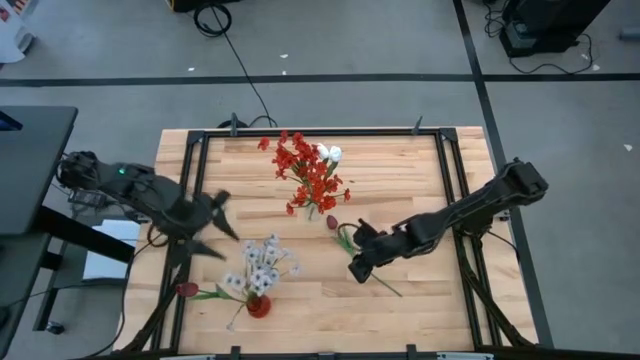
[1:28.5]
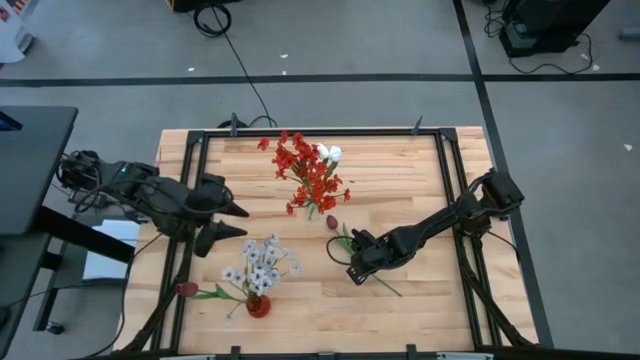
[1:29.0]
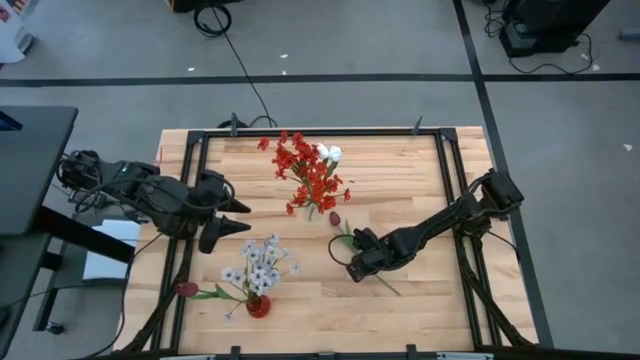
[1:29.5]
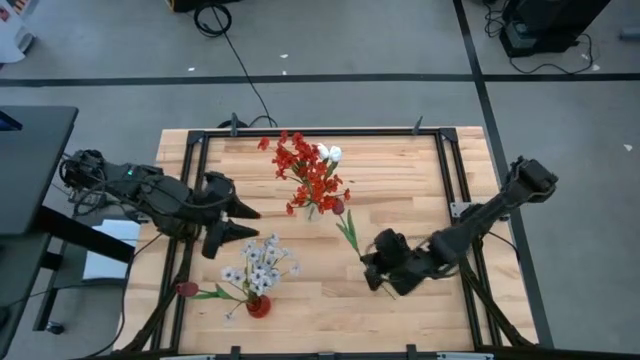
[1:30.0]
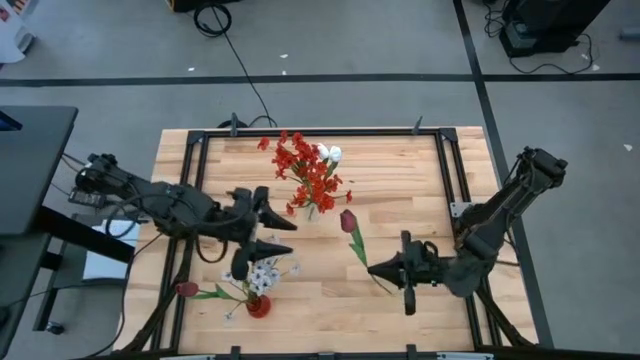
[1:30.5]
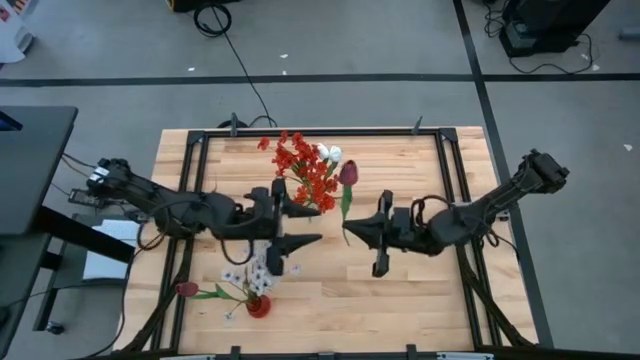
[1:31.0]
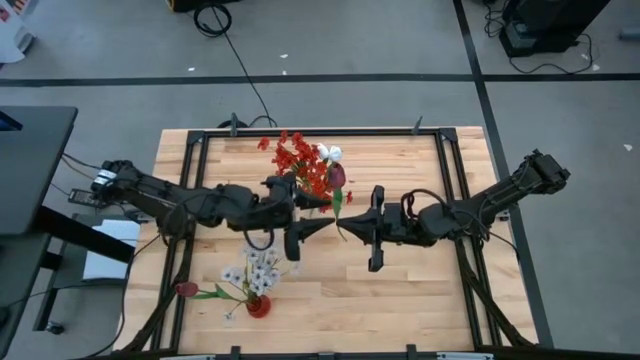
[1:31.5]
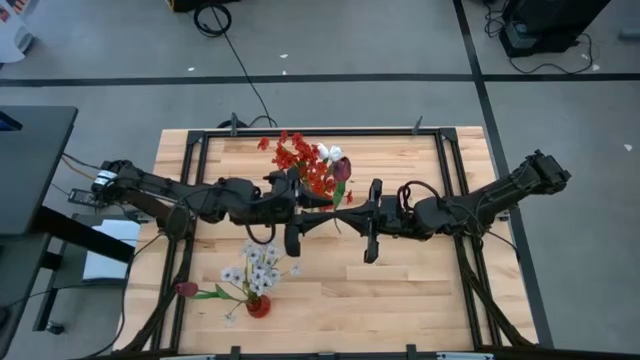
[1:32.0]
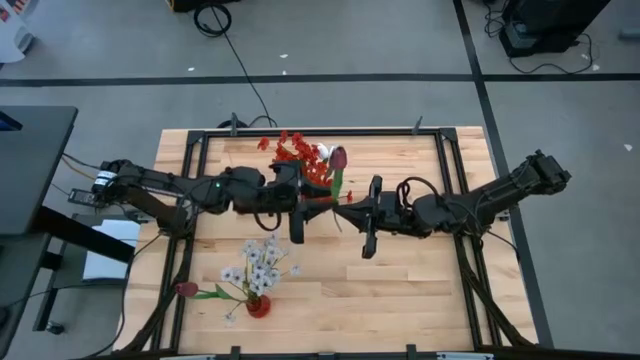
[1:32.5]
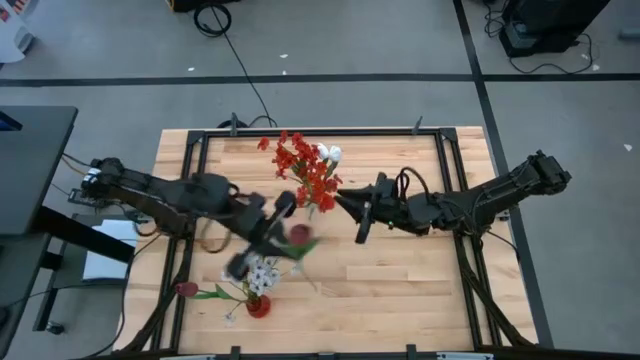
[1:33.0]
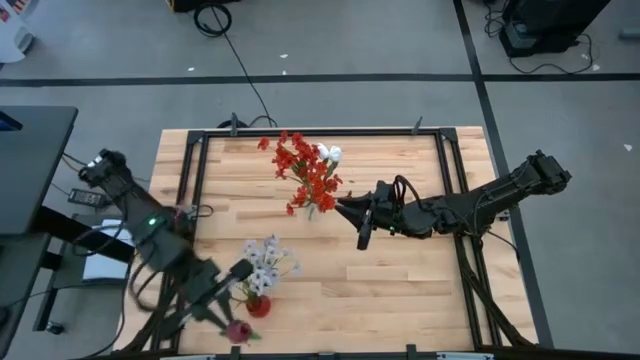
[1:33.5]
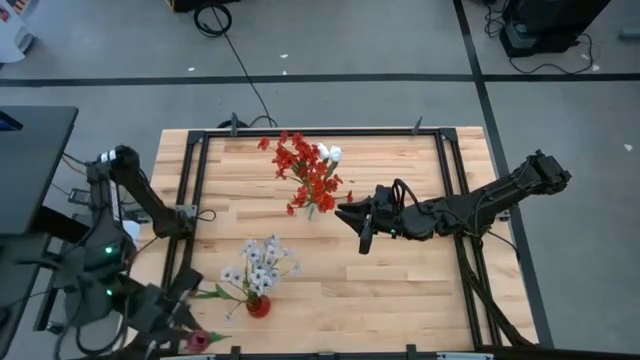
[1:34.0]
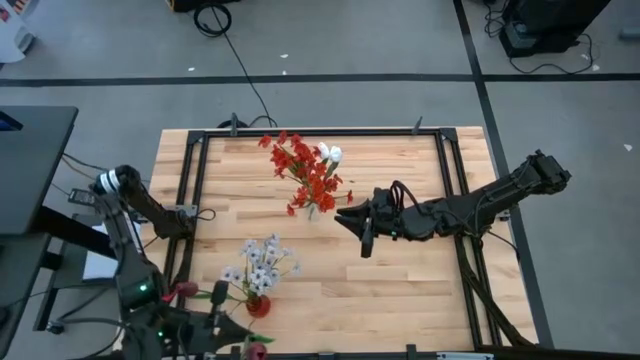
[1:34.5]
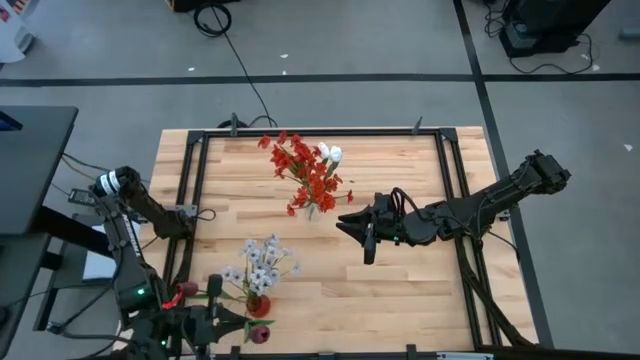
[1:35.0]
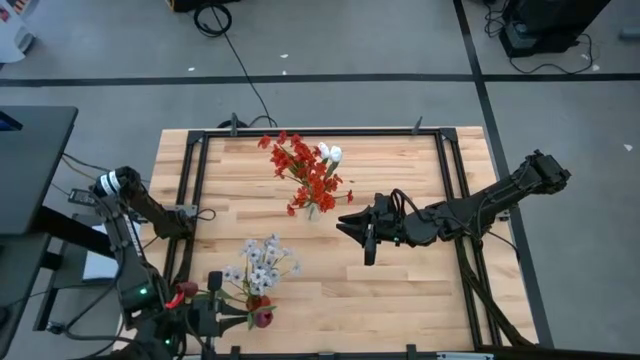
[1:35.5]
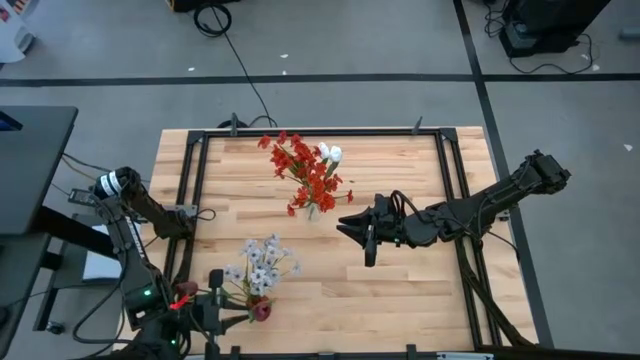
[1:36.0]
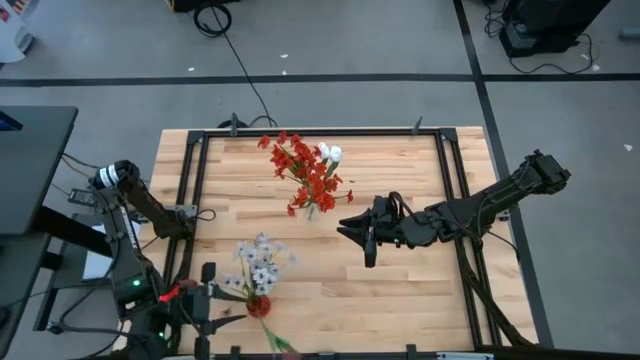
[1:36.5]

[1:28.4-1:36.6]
Task: Sort flowers into vase by color
Put the red flower into the red vase

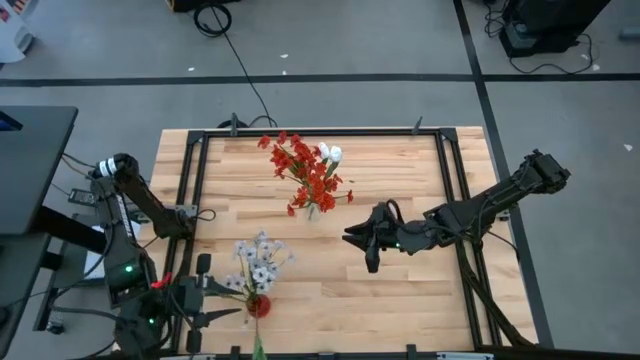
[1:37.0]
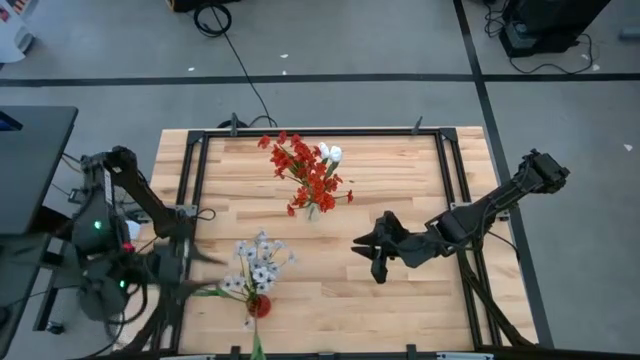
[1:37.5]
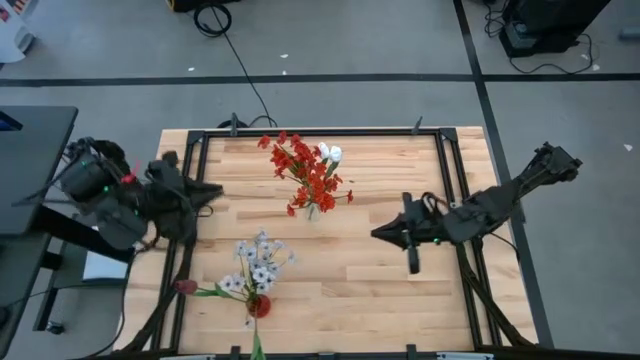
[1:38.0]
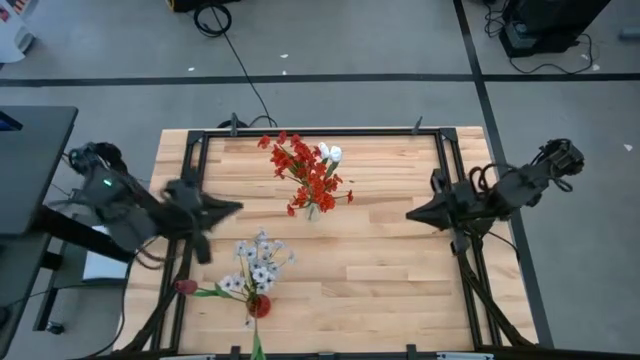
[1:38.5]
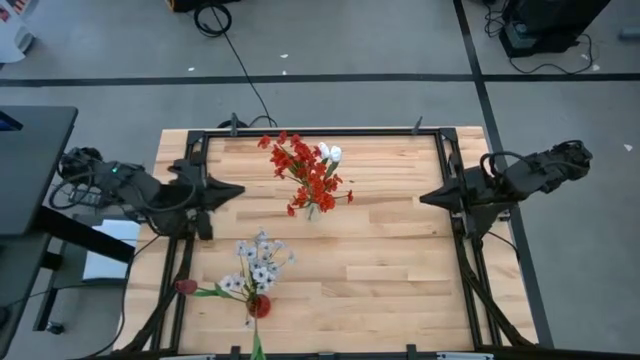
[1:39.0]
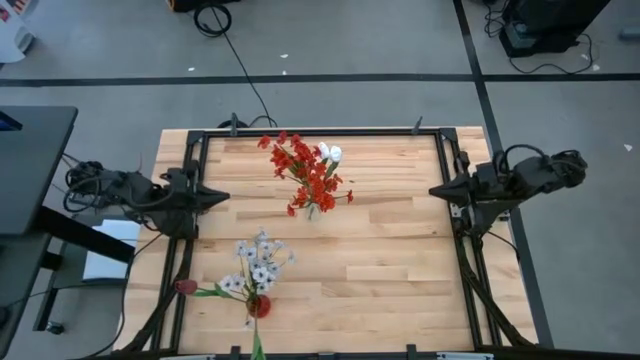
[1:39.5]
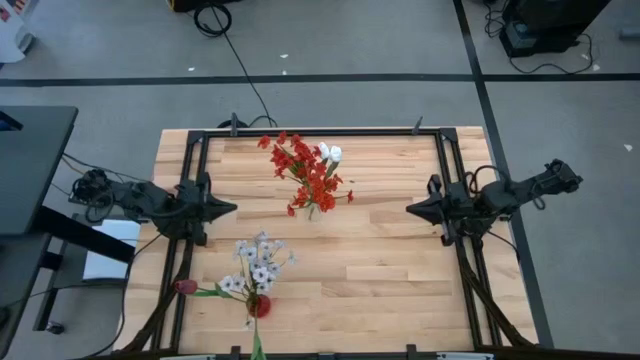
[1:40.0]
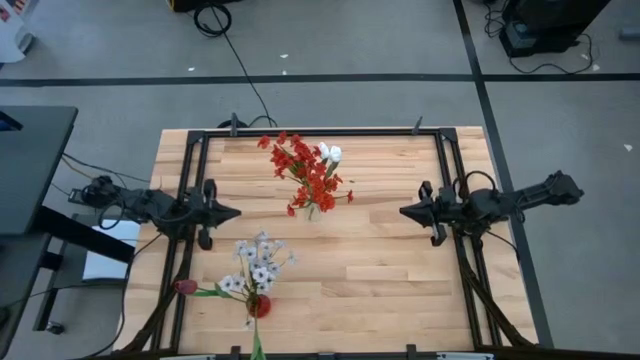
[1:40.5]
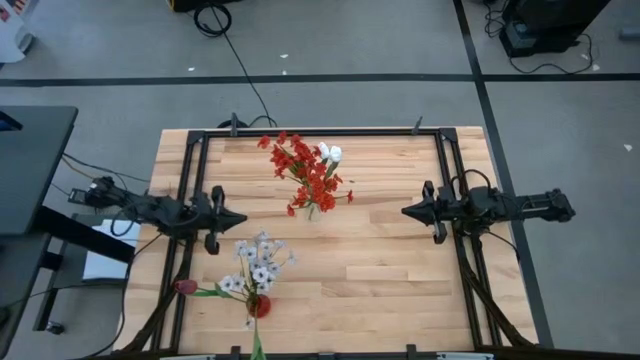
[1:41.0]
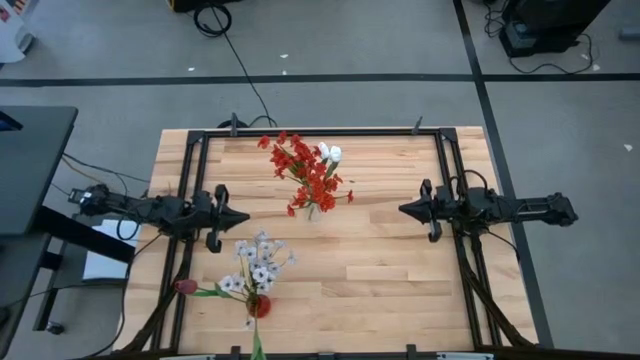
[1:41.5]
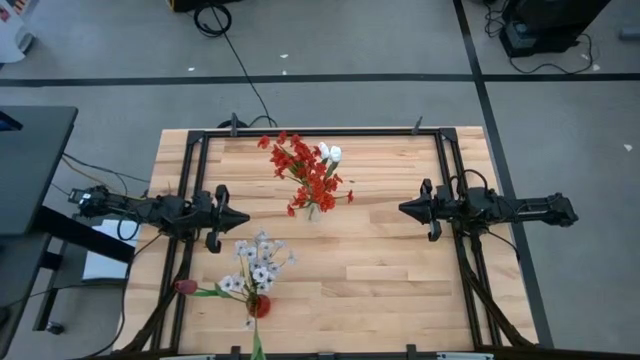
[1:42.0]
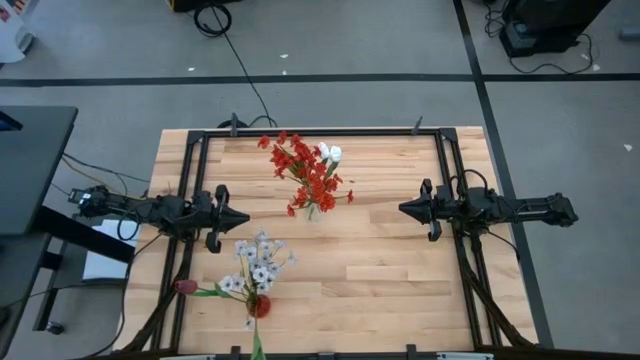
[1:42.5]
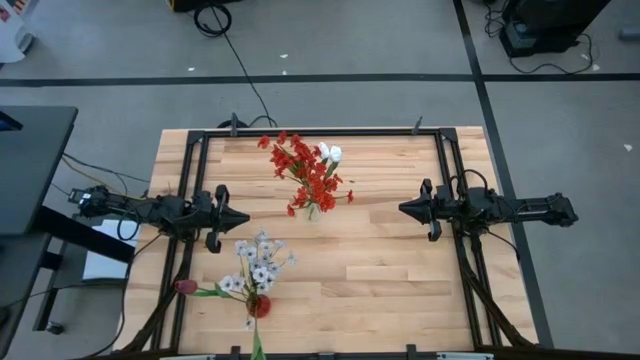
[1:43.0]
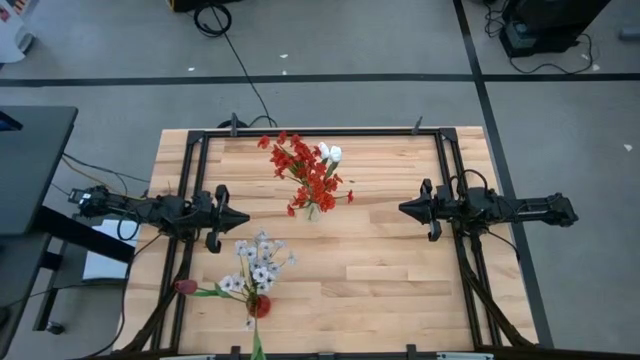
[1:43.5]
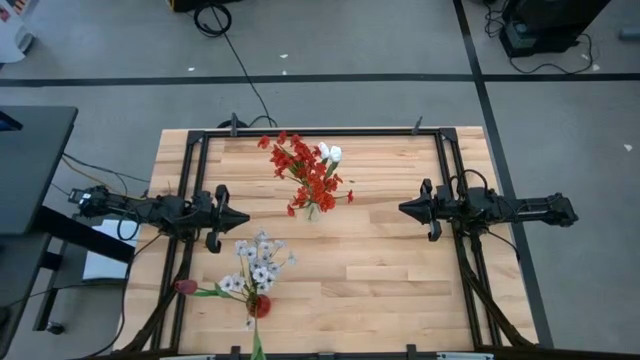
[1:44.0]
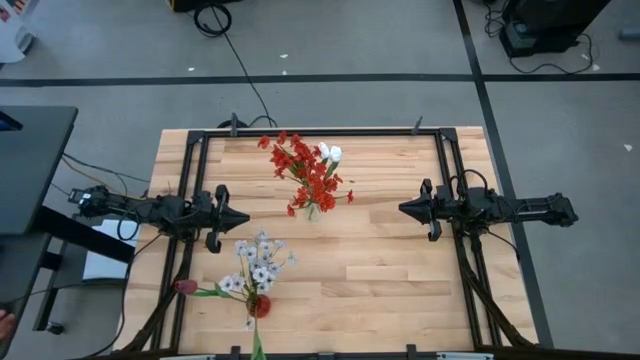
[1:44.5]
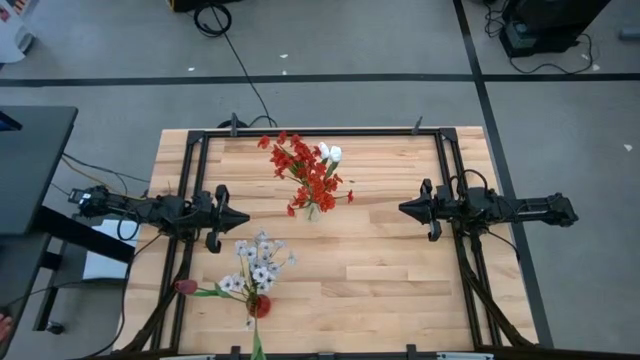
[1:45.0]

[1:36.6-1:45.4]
Return to Home Position

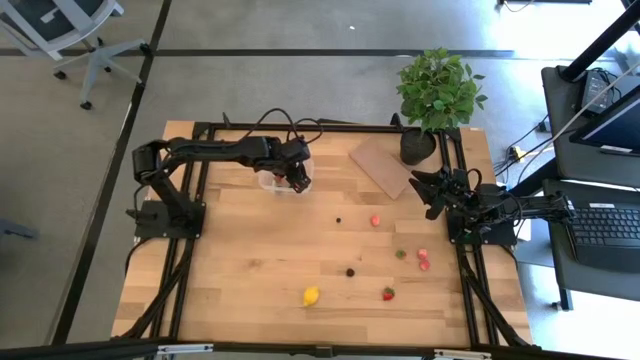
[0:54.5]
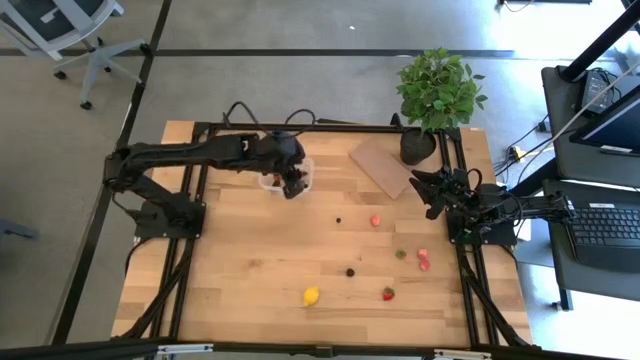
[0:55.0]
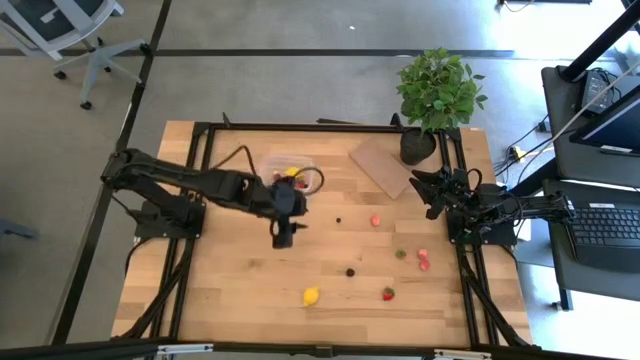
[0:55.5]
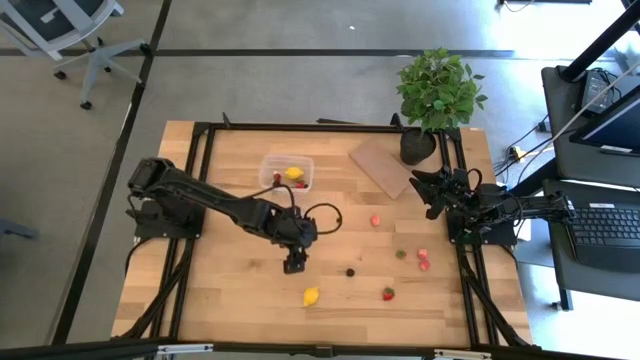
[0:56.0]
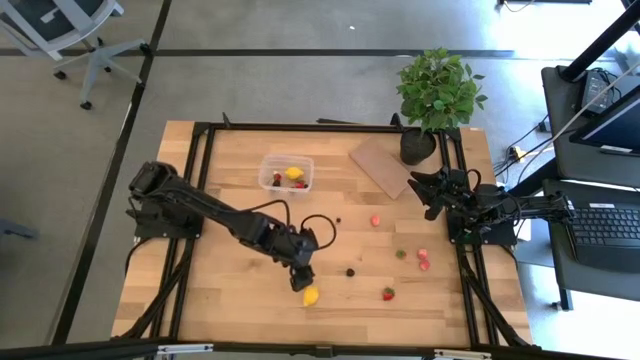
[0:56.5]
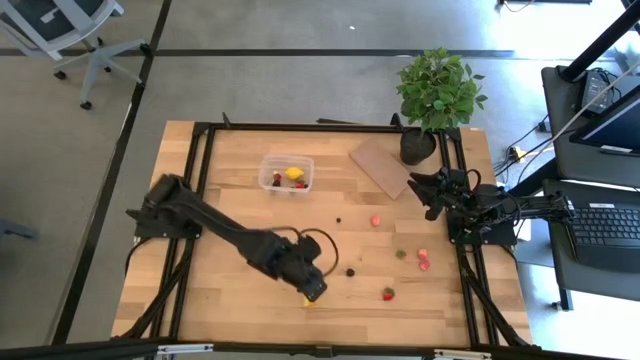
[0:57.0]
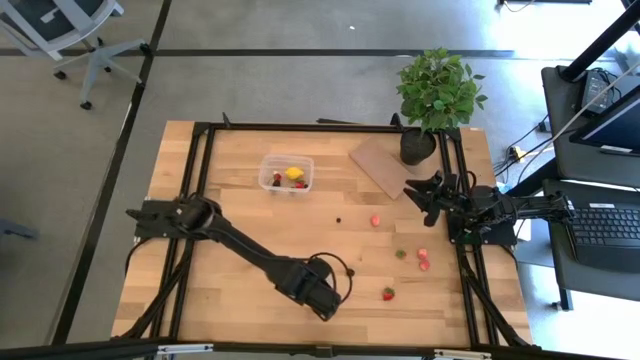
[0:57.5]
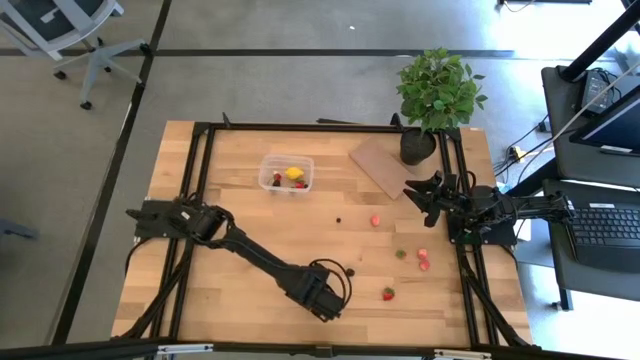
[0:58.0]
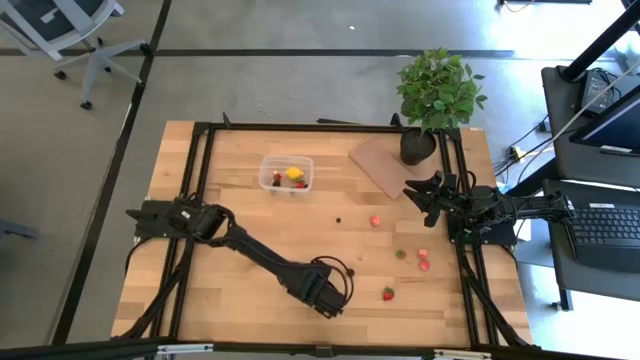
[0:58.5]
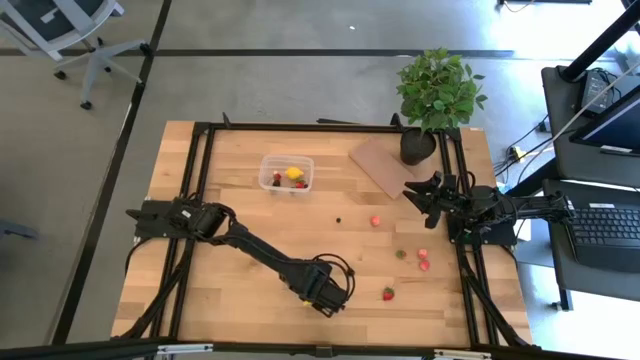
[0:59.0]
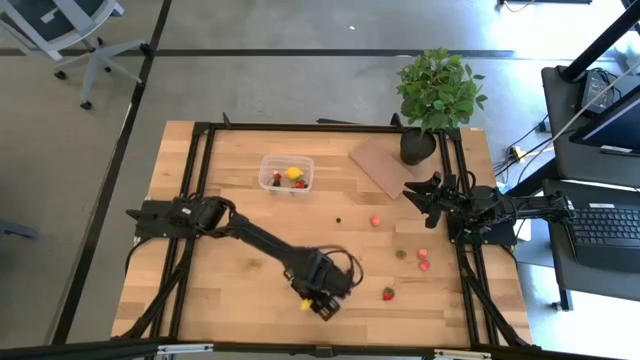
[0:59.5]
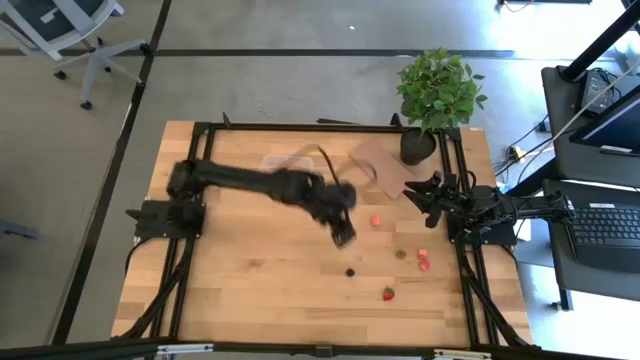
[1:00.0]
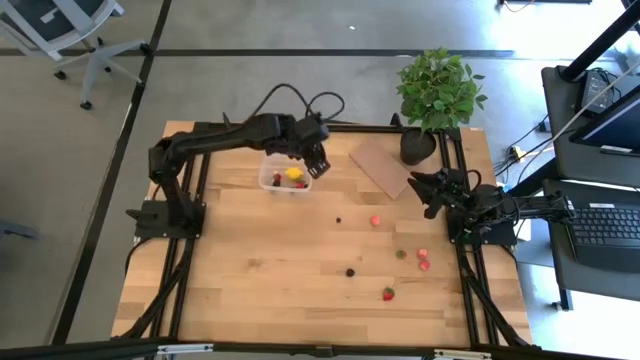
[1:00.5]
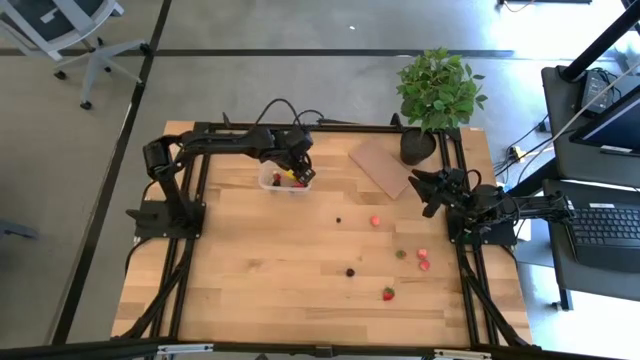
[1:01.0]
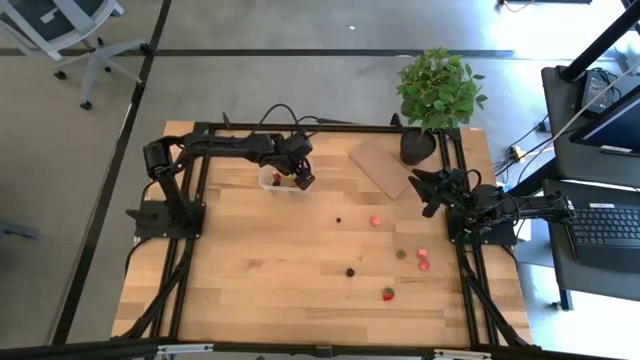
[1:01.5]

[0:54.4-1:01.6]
Task: Pick and placing Produce into tupperware
Put the yellow lemon into the transparent bin
